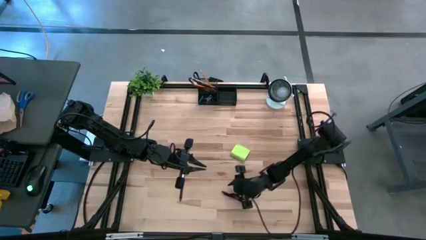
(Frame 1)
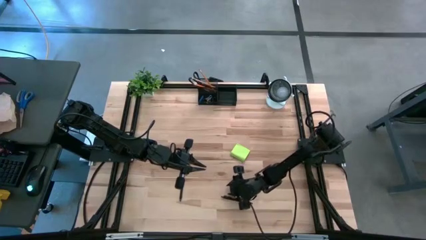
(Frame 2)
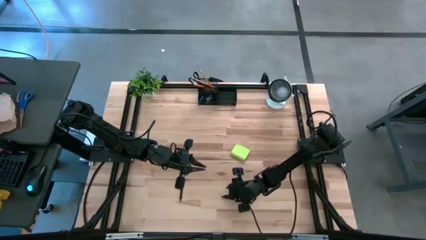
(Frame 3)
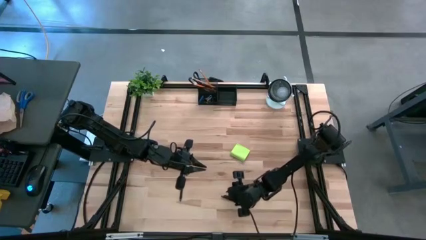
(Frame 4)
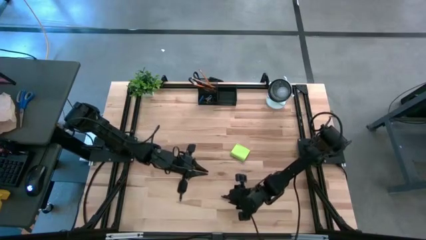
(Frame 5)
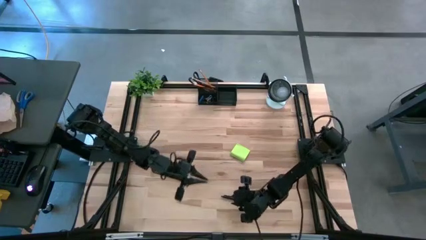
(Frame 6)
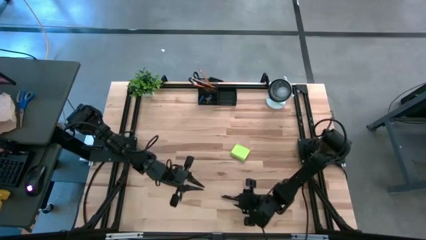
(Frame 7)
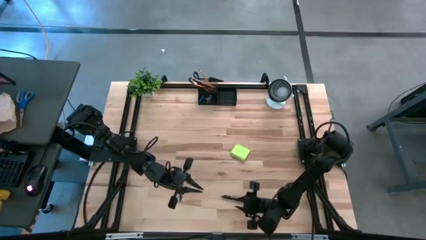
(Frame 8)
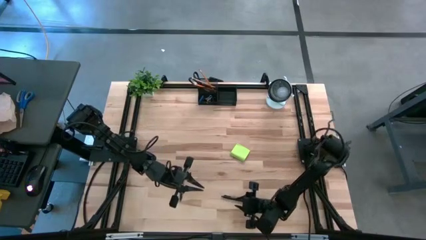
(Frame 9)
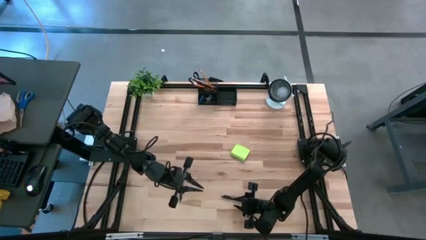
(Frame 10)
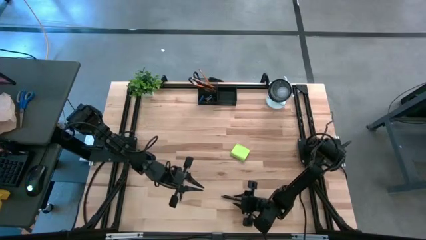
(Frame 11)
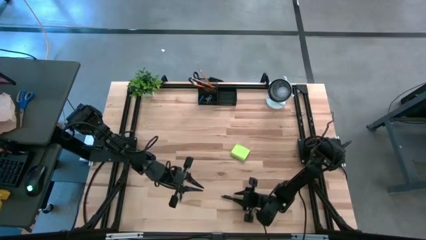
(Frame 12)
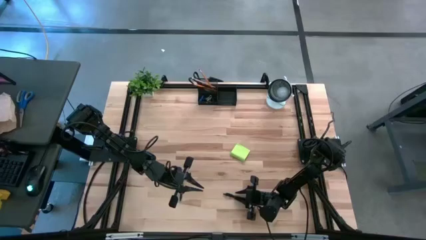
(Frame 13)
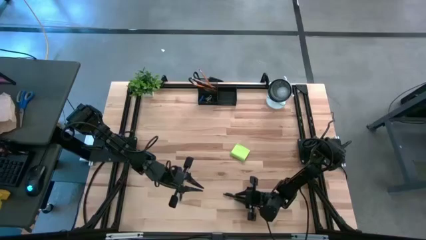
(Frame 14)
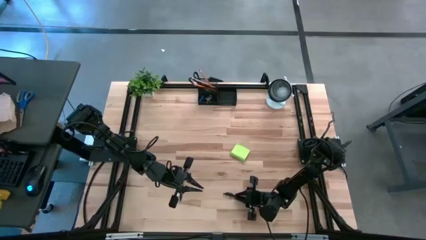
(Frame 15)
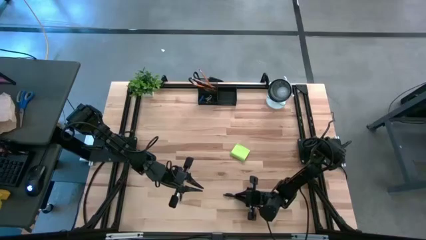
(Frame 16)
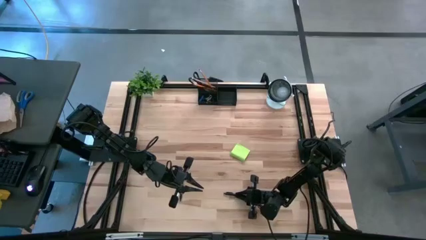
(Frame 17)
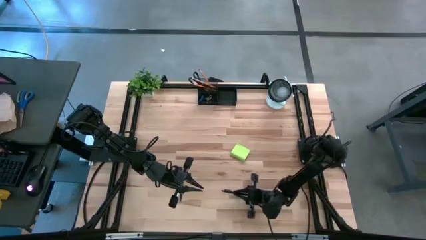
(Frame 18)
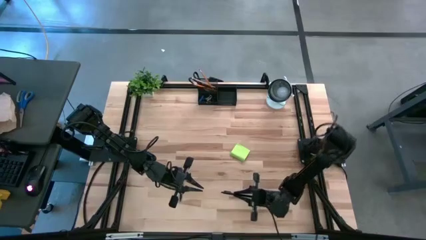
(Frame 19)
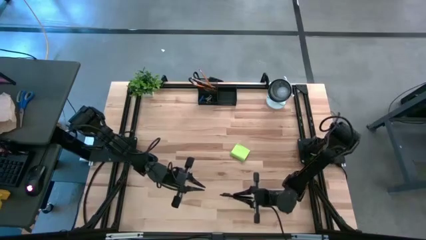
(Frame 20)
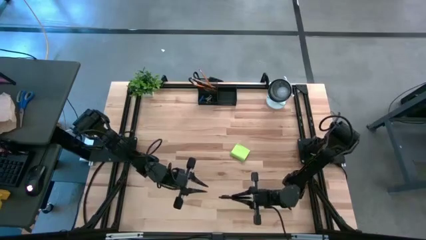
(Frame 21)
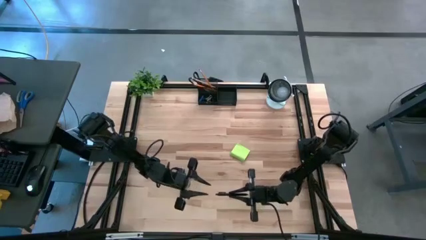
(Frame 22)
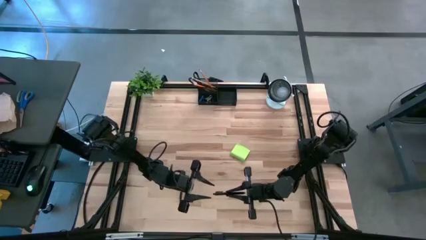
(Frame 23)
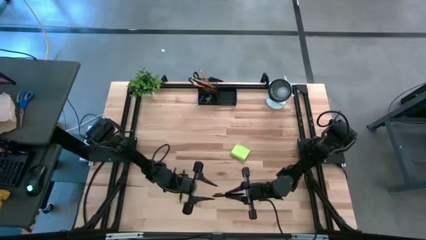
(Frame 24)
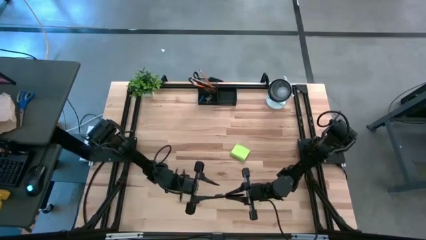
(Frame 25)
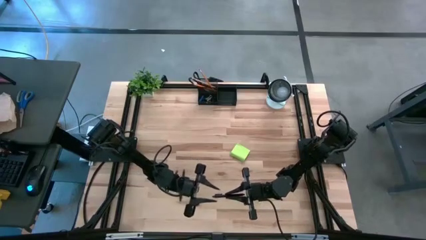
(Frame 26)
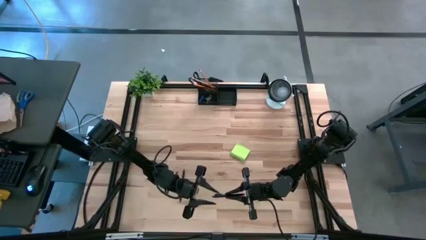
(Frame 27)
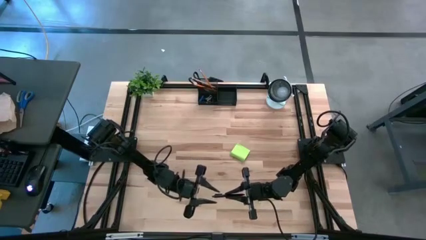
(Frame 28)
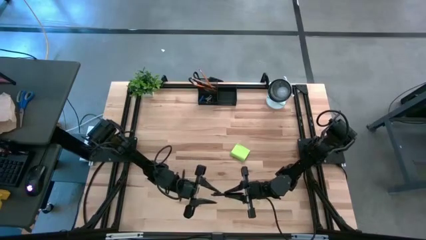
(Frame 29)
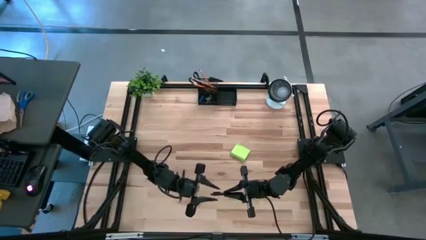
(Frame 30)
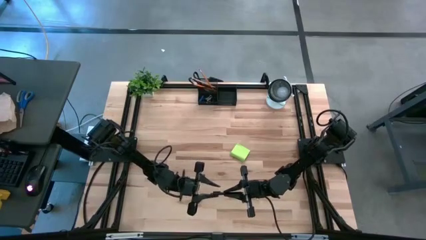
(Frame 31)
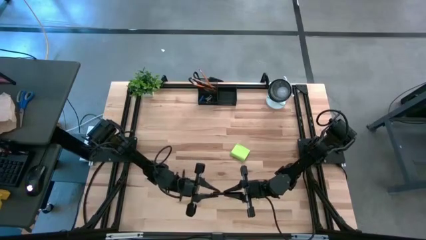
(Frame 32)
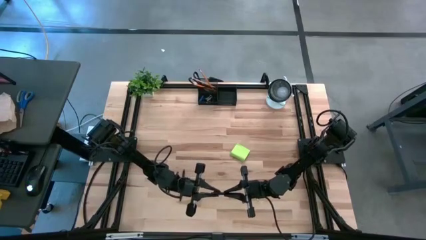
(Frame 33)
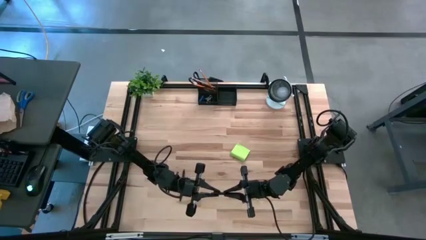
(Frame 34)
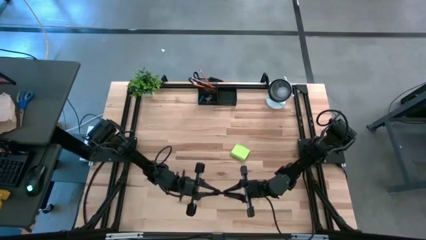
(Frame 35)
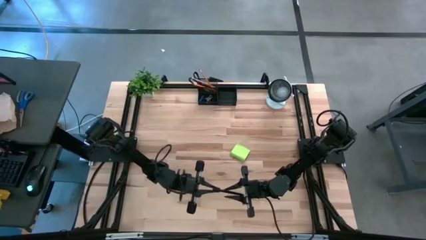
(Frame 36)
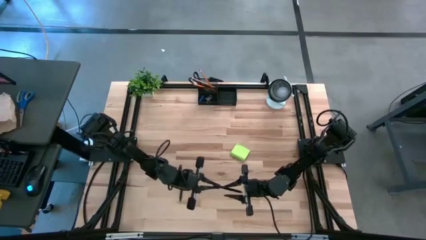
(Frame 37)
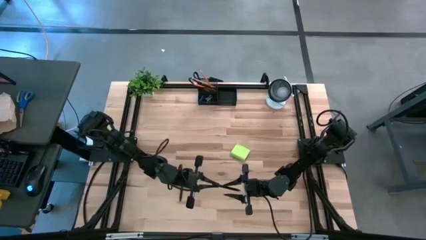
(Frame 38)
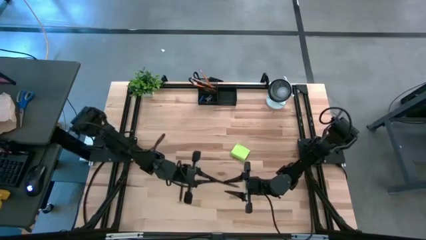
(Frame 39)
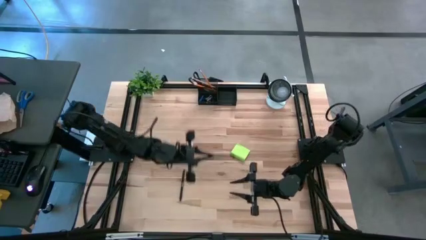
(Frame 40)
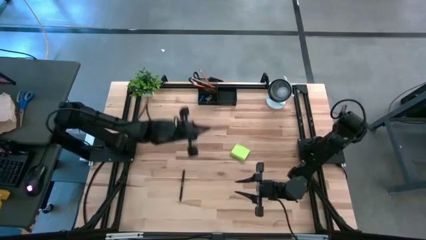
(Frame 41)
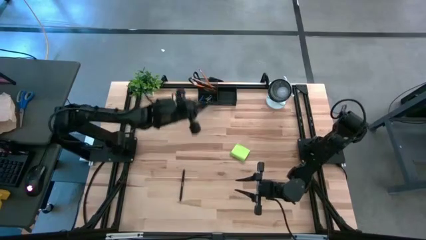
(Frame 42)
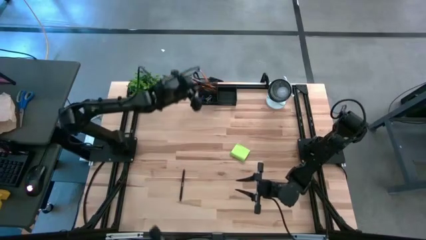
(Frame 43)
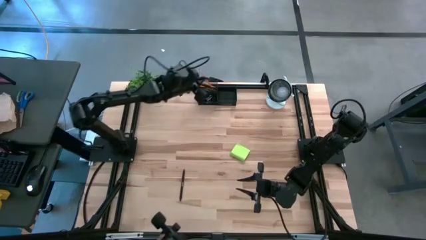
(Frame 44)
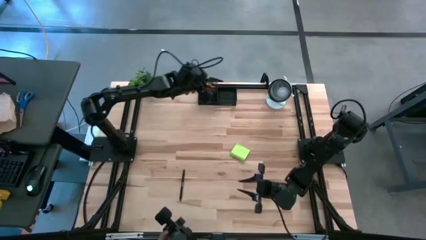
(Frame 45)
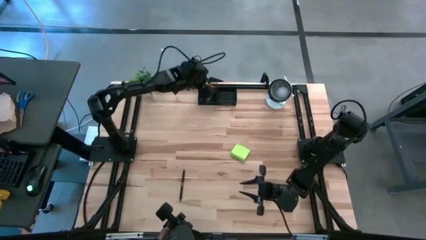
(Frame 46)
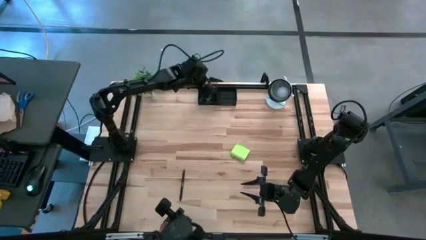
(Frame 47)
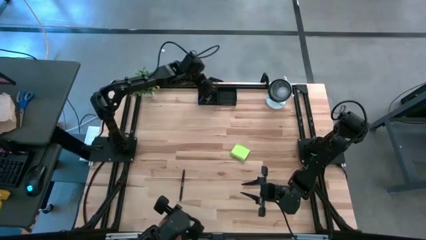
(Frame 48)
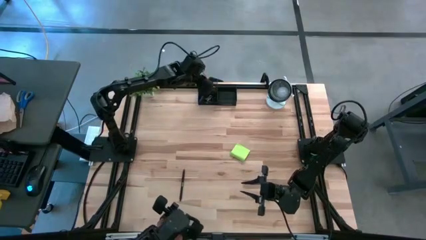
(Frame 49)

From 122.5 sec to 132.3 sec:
Task: Pick and place office supplies into organizer
Put the right black pen into the black desk organizer

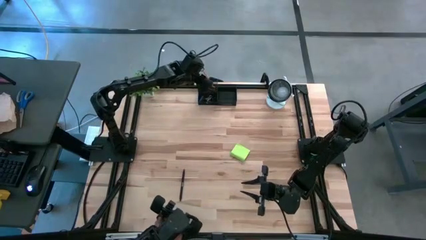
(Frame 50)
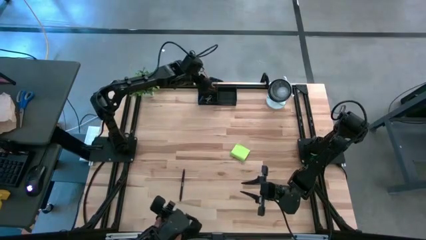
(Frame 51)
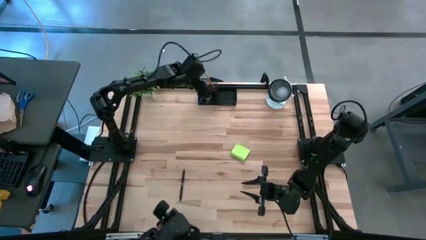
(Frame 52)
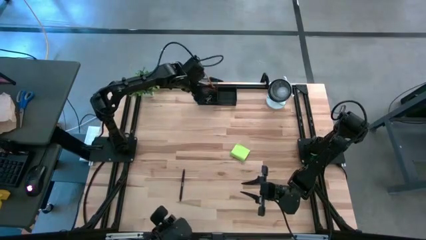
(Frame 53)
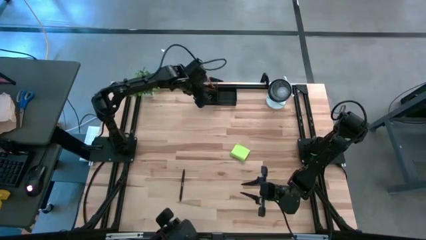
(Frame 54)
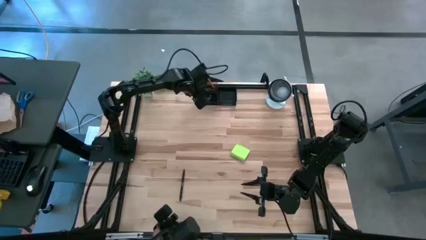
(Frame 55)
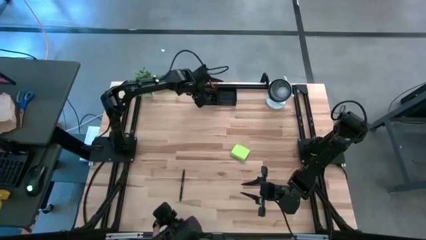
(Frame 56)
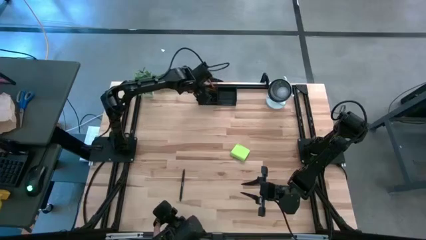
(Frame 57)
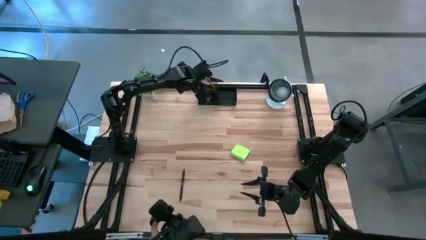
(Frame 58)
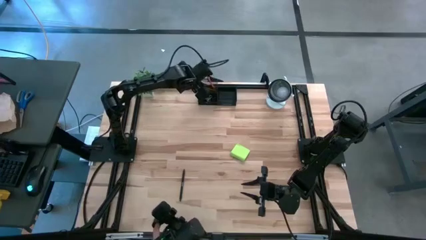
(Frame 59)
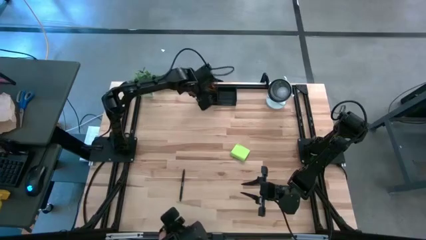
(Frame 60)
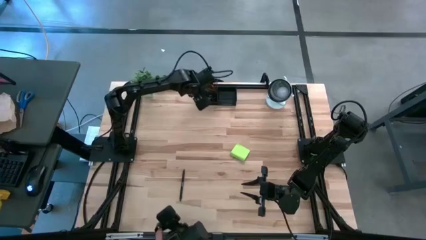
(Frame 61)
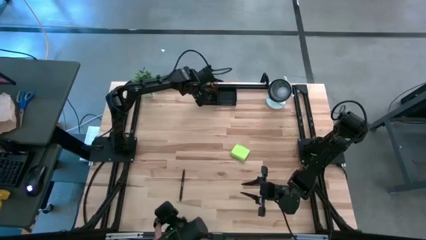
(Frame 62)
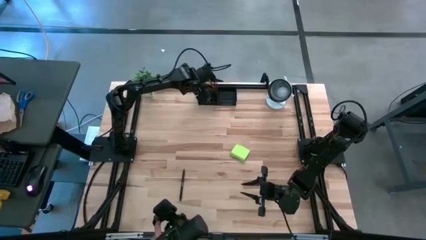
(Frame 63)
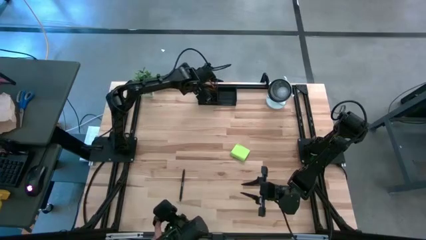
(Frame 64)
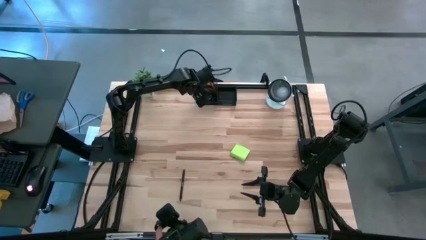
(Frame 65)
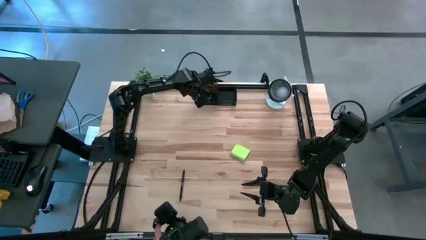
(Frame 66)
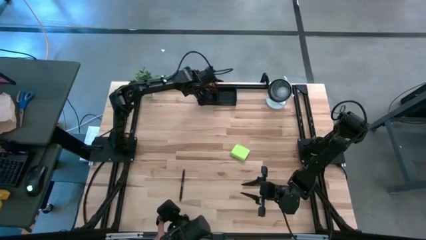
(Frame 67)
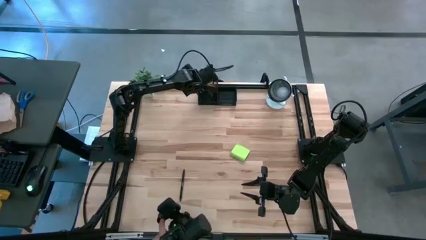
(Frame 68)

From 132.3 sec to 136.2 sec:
Adjust the orange pencil in the black desk organizer

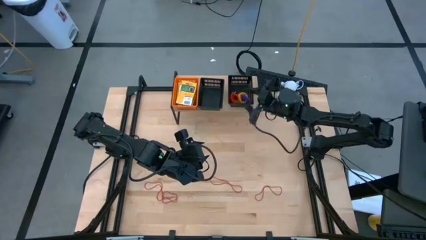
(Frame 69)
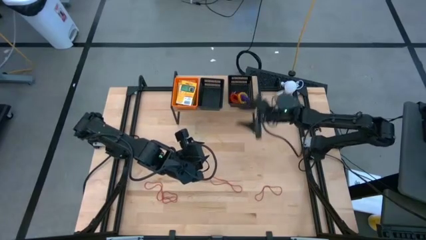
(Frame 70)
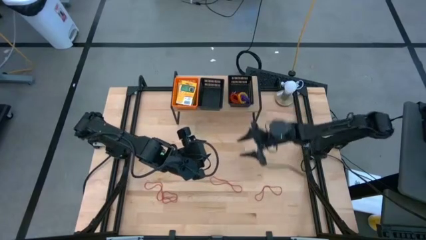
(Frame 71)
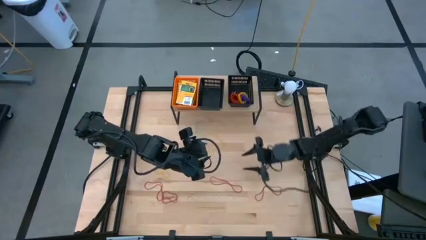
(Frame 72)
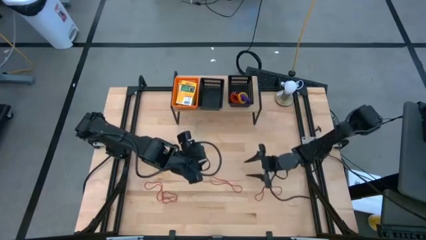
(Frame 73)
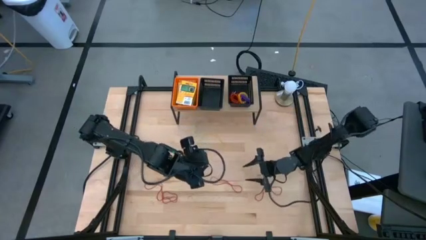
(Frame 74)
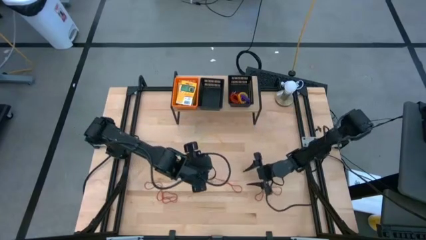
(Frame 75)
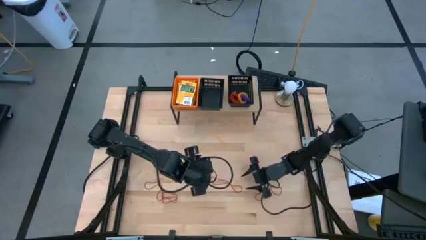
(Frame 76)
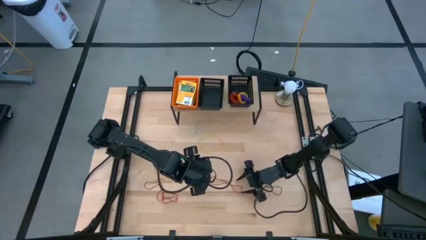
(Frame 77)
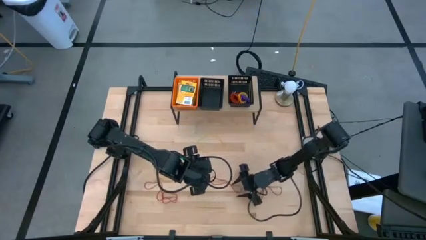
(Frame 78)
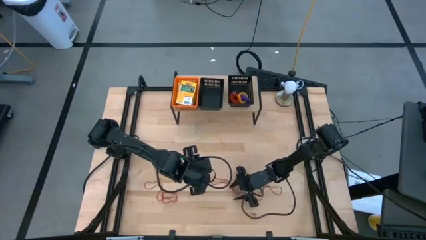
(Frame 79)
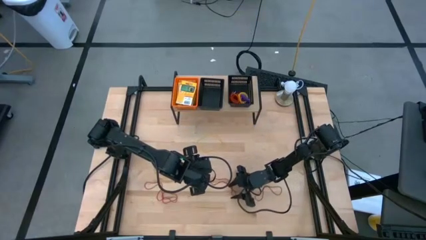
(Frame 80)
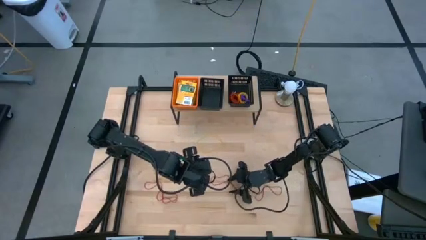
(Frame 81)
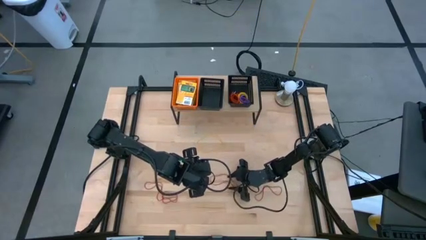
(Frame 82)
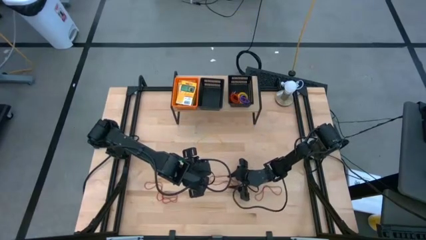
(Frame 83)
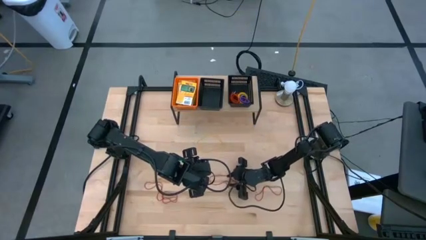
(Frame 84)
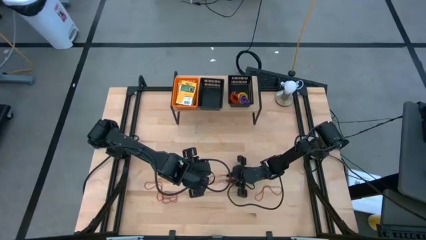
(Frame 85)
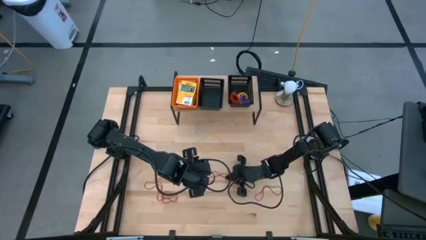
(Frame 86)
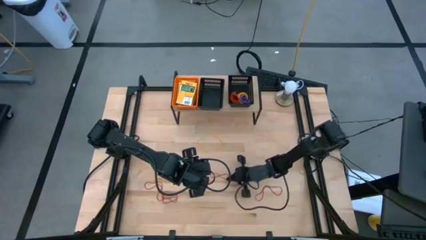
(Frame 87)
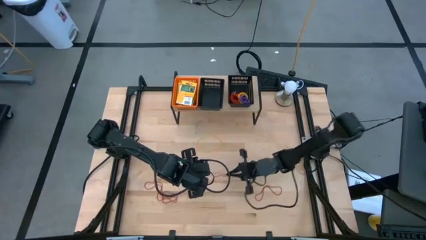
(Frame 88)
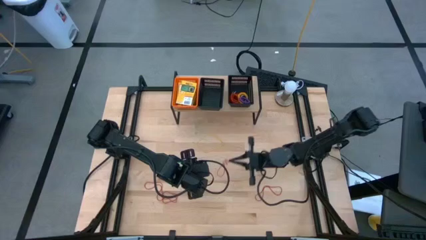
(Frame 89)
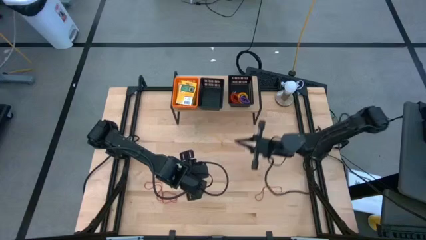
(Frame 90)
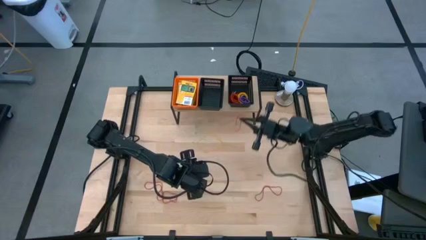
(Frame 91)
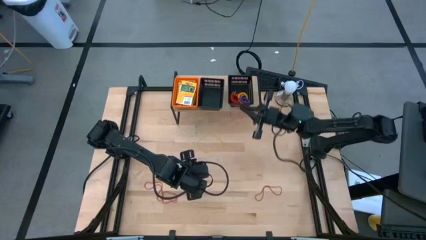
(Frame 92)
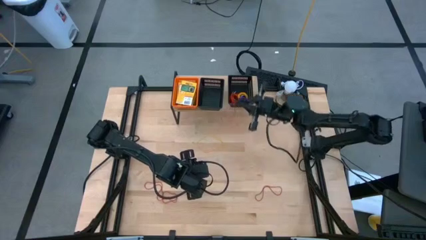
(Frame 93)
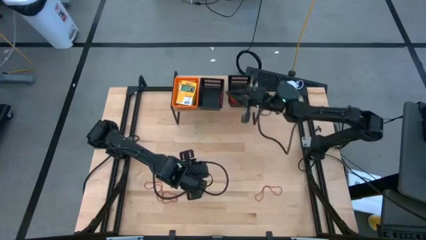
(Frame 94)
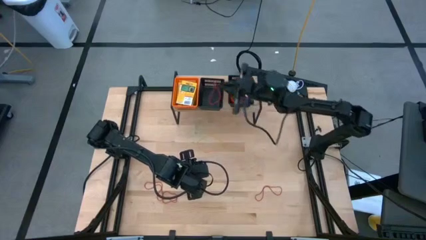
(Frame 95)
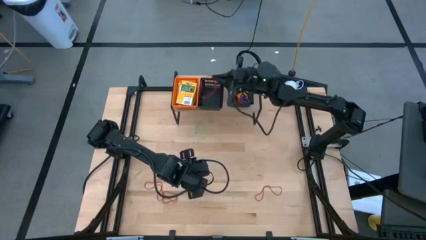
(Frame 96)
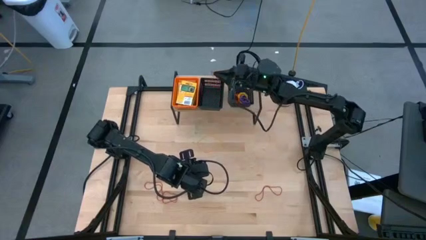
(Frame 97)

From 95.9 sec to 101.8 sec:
Task: Pick & Place Office Desk Supplies
Put the red rubber band into the left black bin on the shelf
